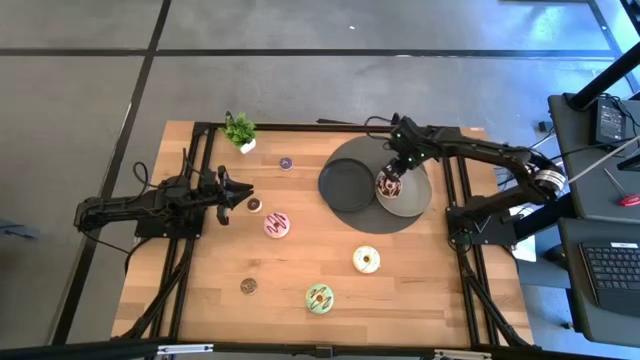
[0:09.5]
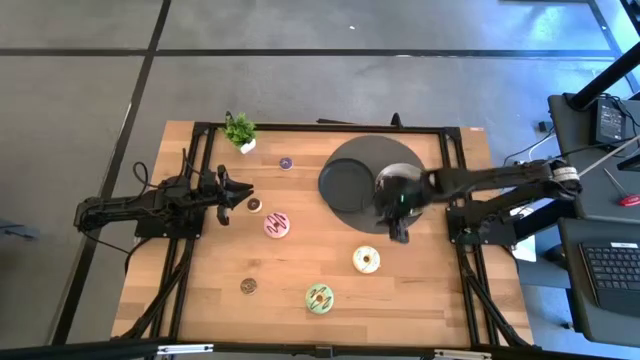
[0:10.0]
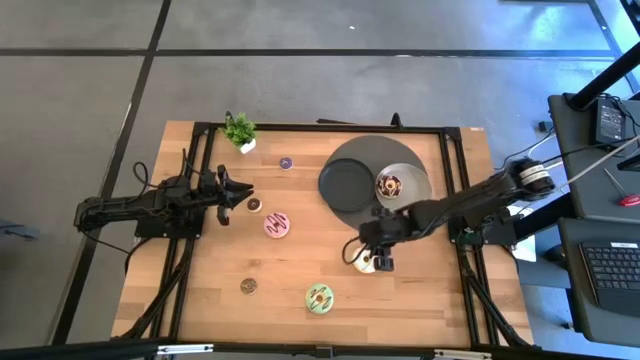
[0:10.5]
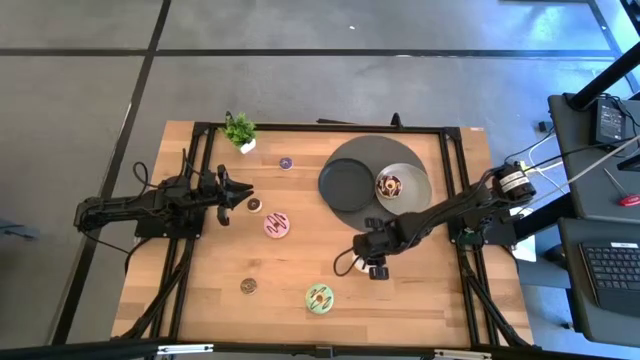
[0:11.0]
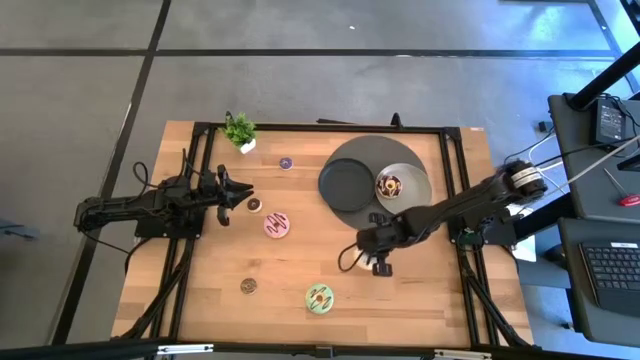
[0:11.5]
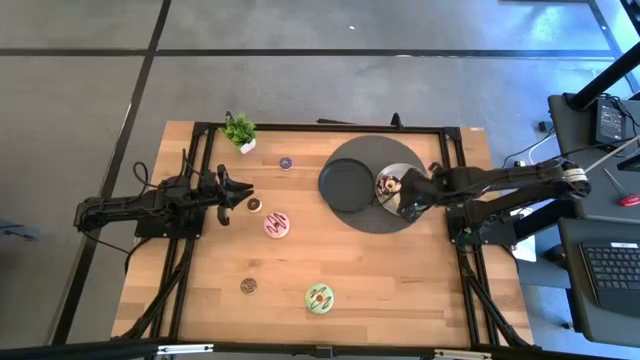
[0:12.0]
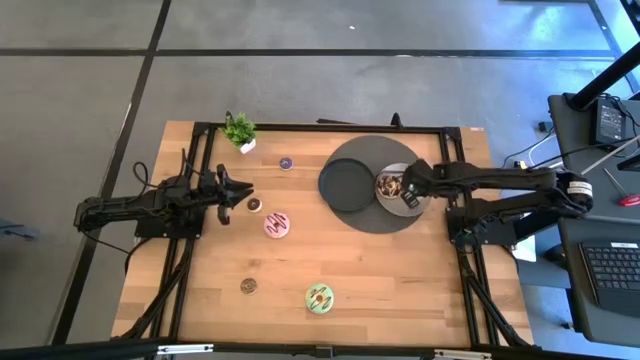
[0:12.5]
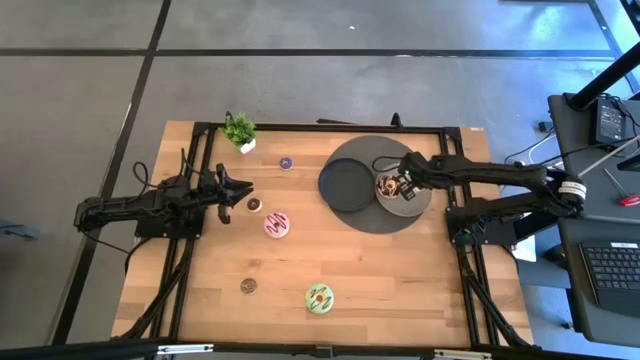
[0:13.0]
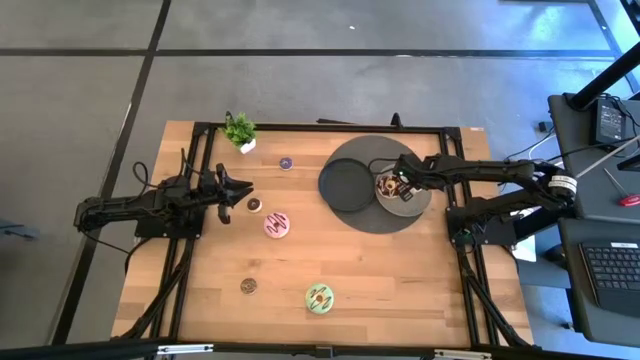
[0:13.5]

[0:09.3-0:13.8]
Task: Pick & Place donuts
Put the large white donut on the gray plate

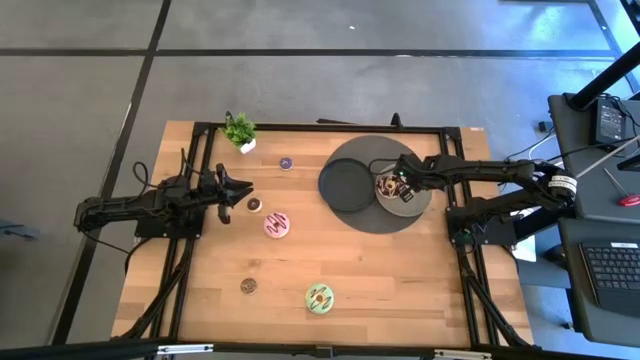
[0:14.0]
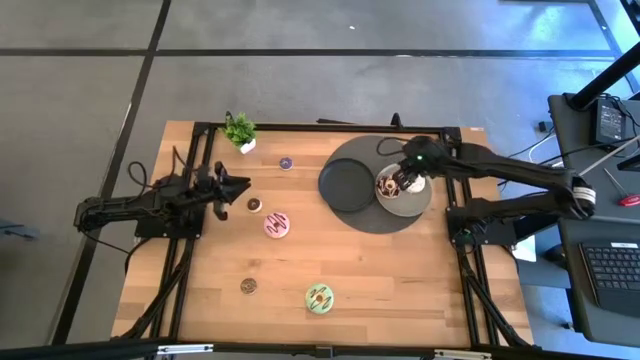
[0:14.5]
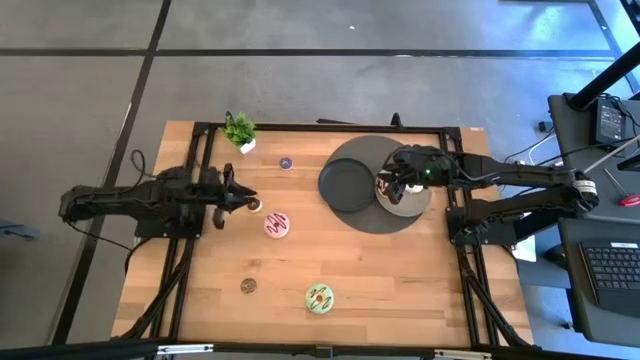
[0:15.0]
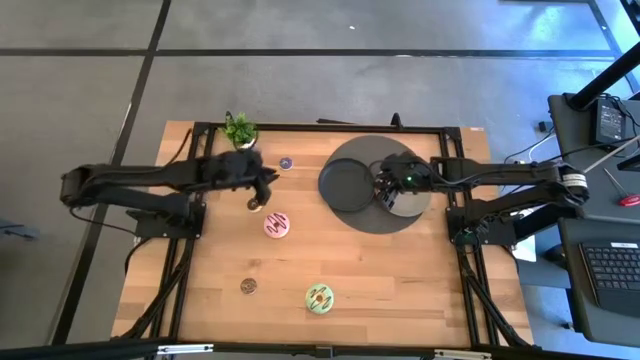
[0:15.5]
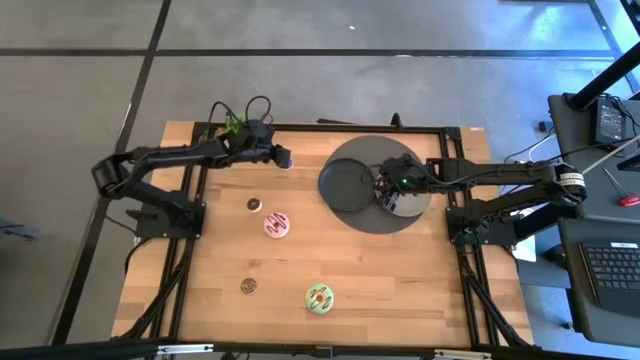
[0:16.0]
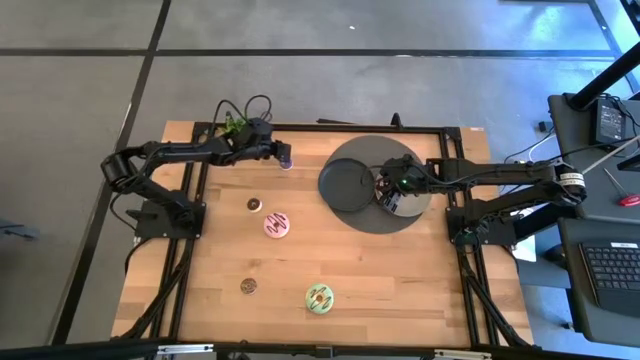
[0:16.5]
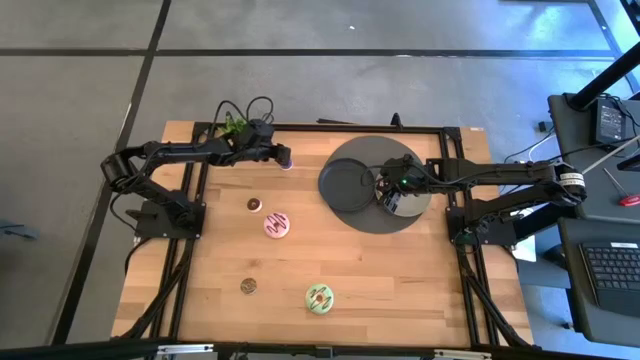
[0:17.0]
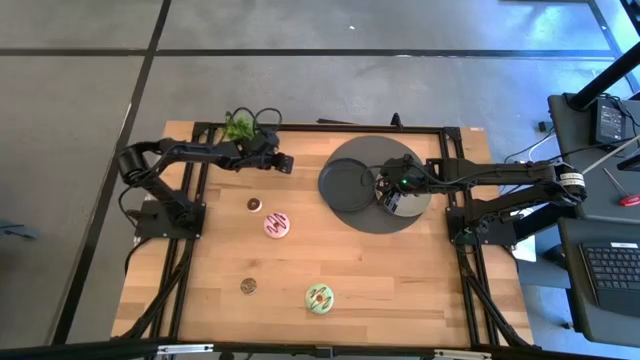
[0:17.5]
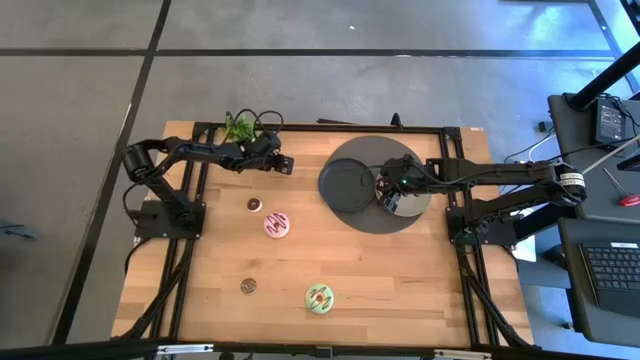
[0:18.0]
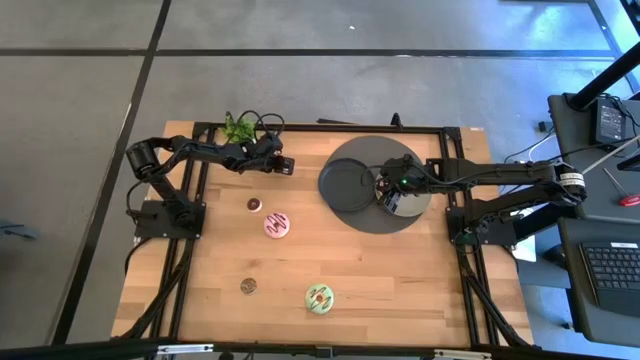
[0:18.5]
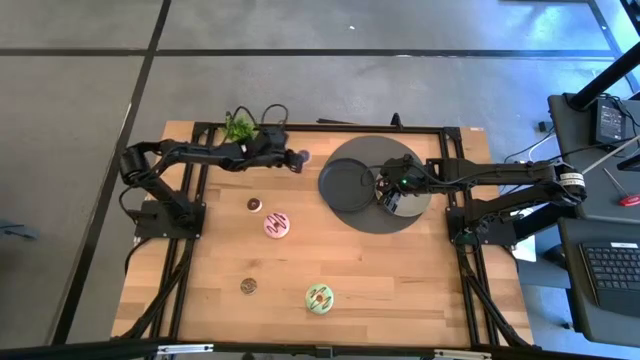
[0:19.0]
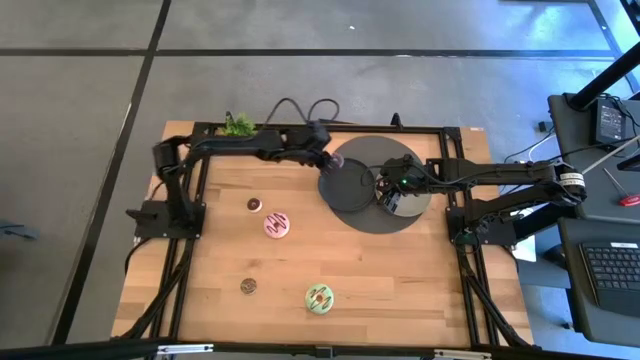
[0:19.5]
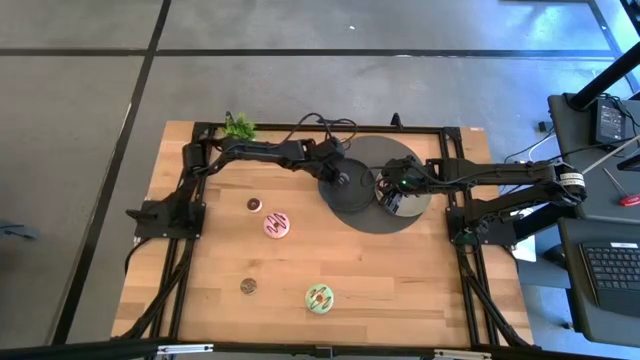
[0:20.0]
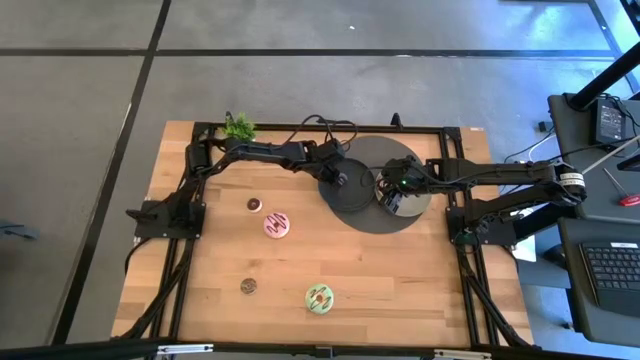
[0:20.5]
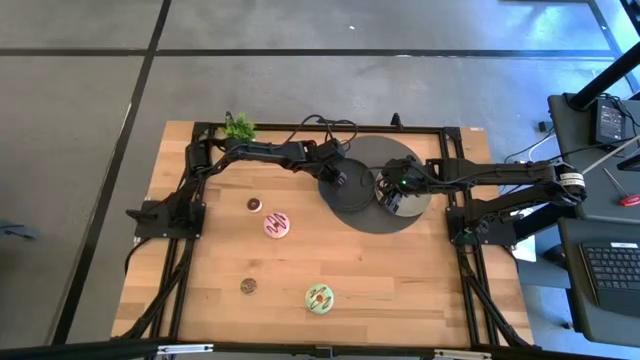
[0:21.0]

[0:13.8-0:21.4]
Put the small blue donut on the black plate

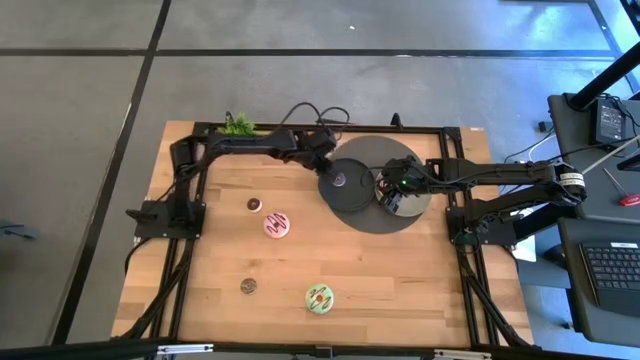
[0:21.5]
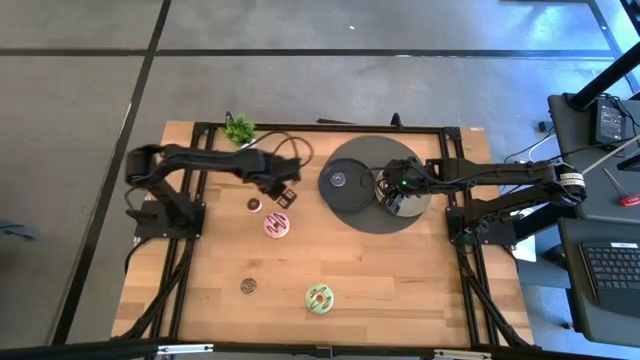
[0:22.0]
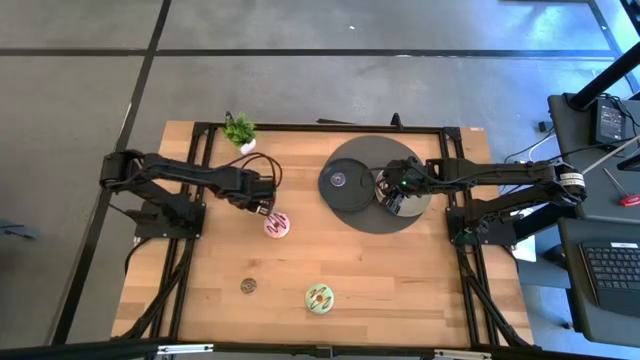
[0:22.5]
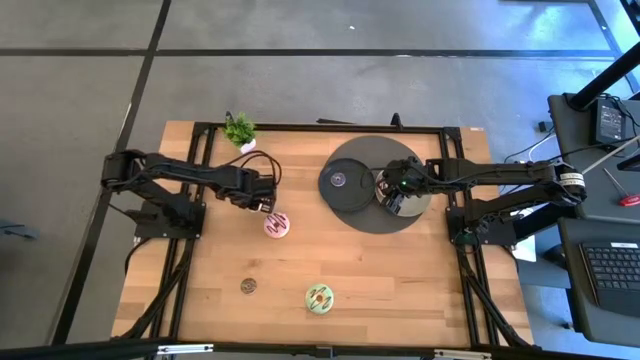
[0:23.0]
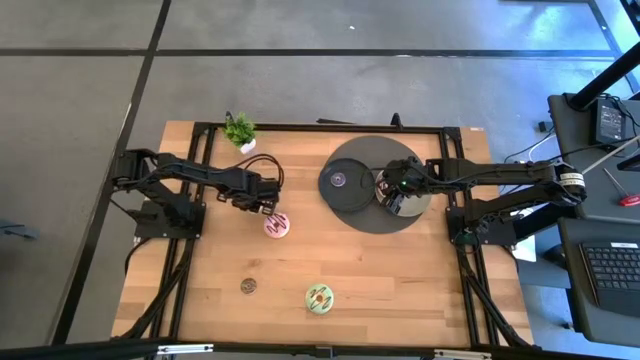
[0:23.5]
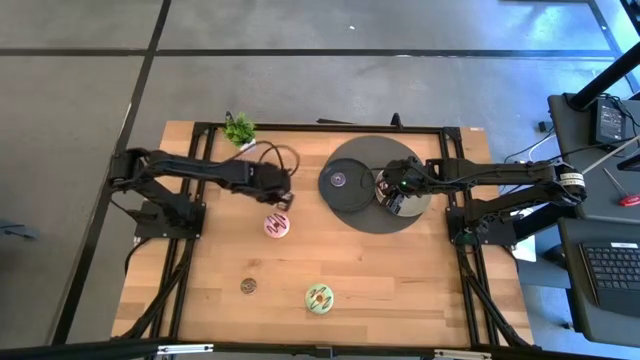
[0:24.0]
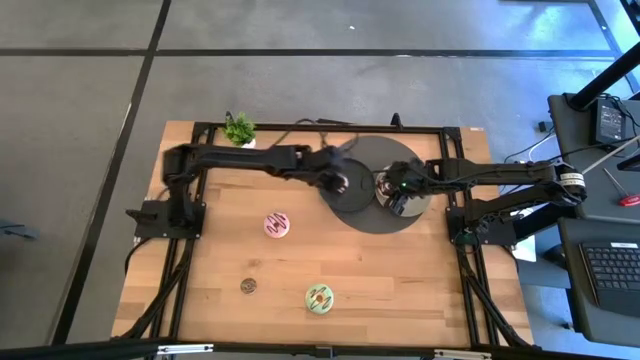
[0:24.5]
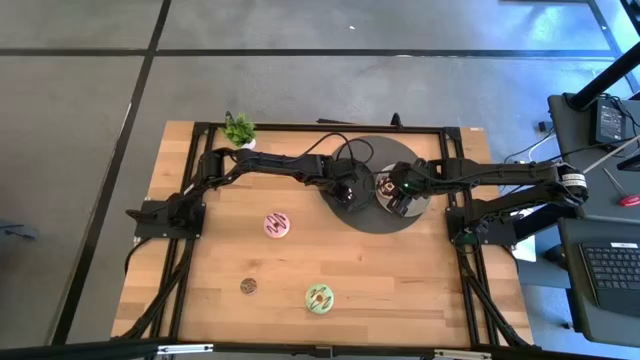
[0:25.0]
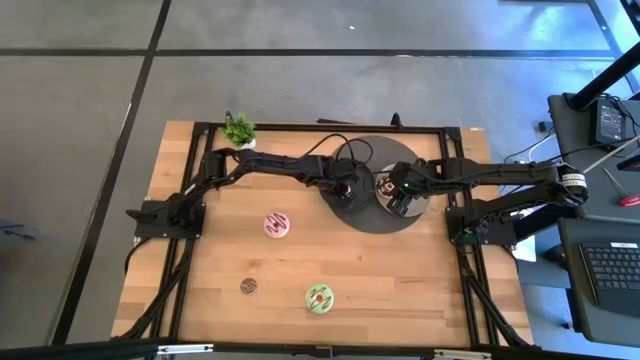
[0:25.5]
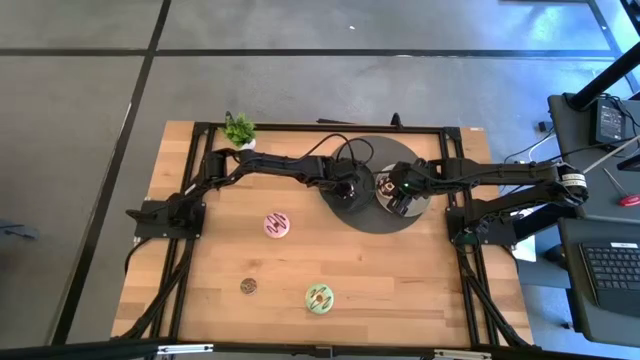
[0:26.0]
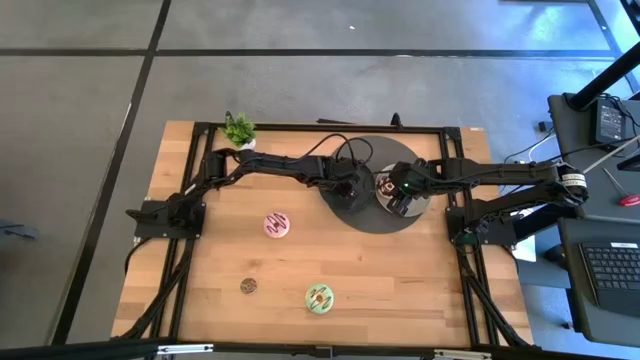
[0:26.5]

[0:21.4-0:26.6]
Put the small black donut on the black plate

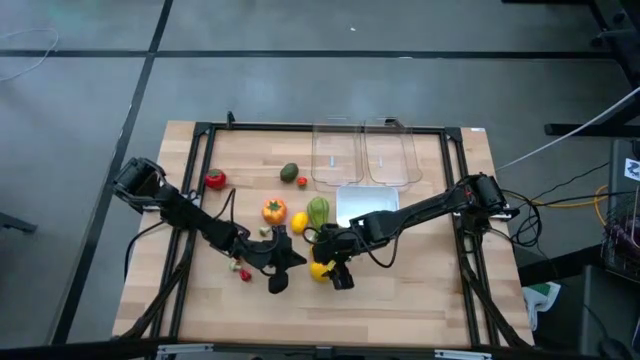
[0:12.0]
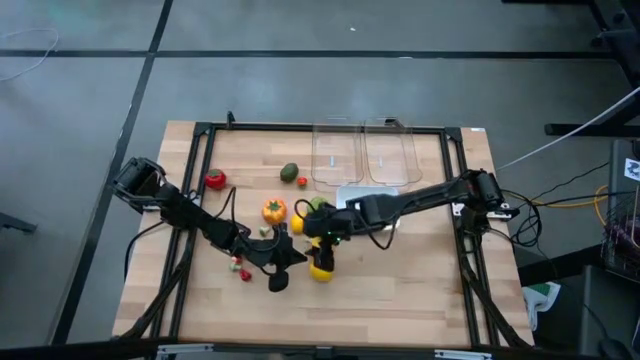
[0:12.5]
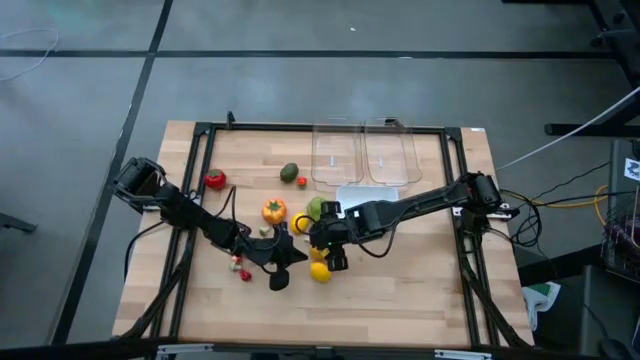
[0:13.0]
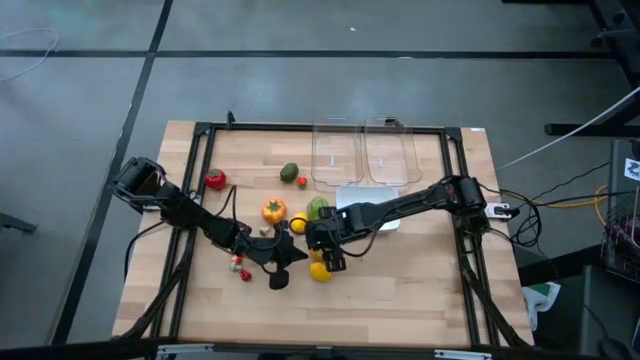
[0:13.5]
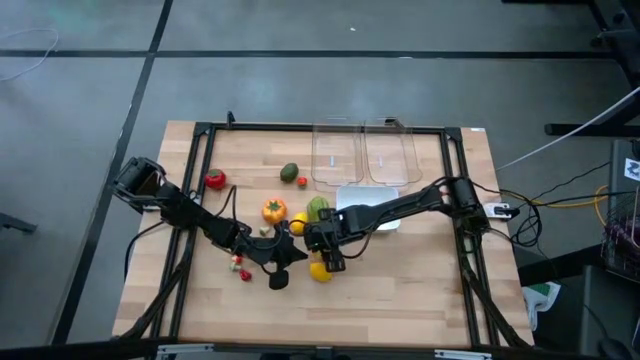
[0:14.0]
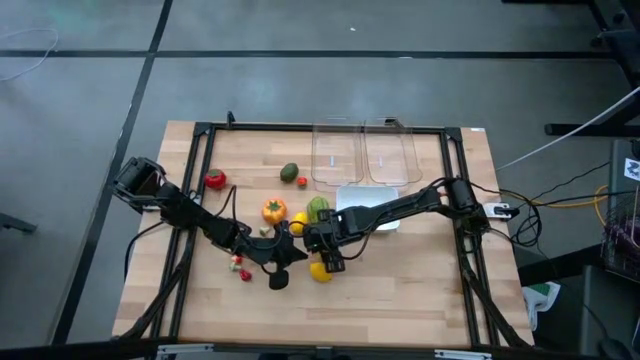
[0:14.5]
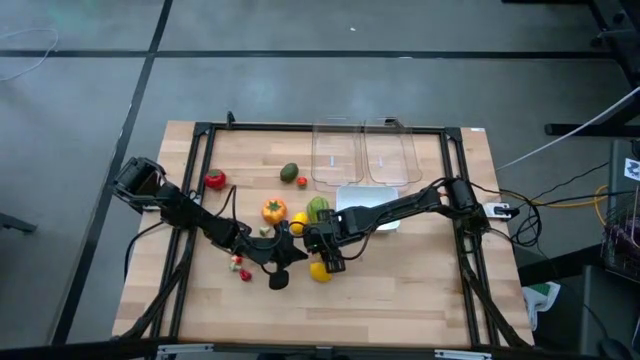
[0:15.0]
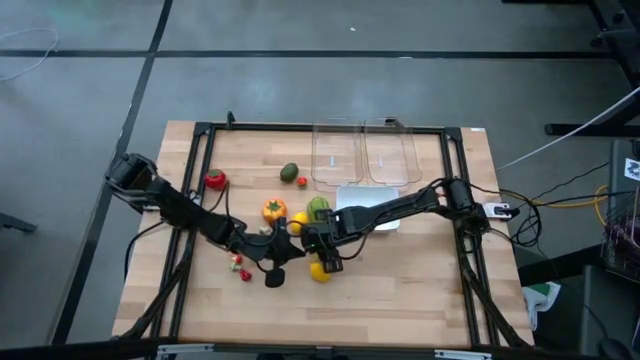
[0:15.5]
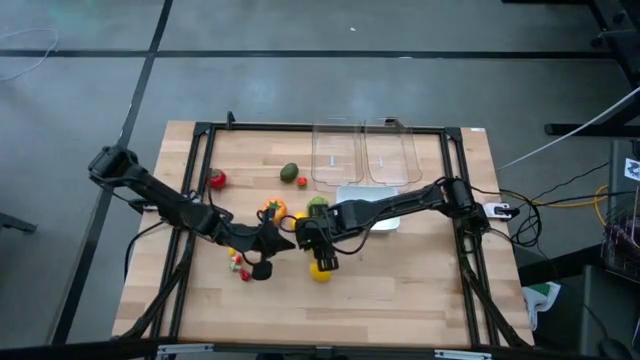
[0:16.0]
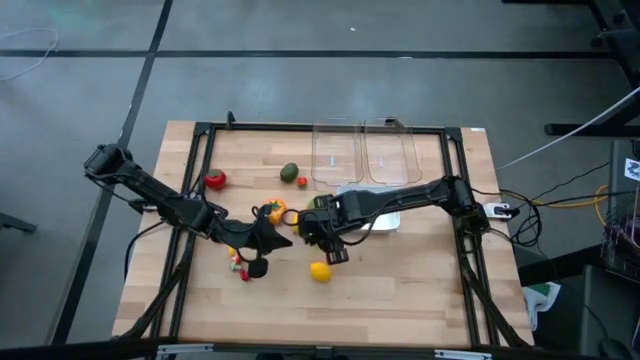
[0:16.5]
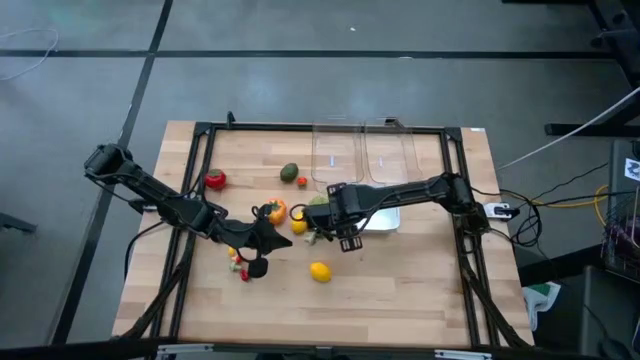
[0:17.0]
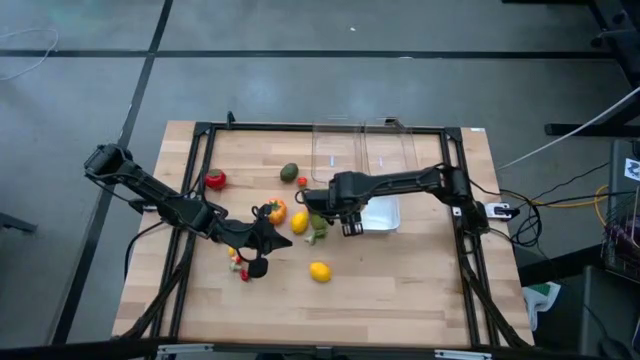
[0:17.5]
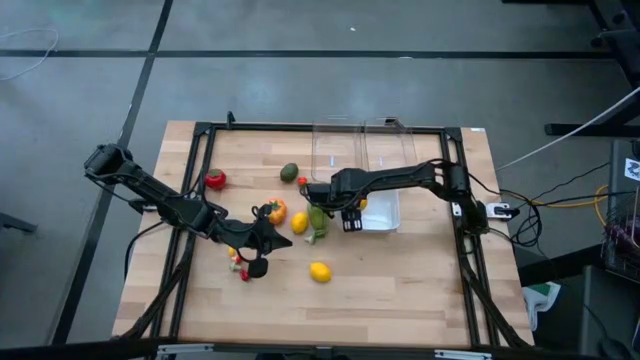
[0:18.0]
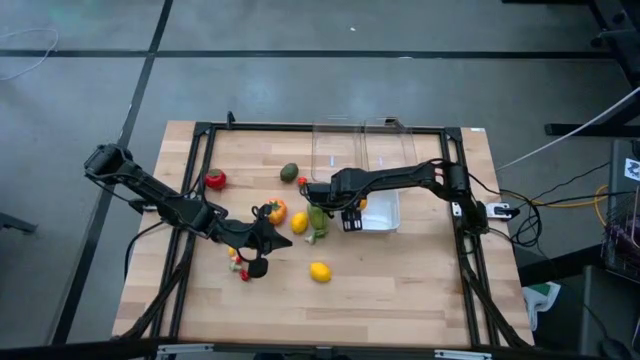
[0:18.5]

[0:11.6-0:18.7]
Task: Sort produce into baskets
Put the middle lemon into the white bin
